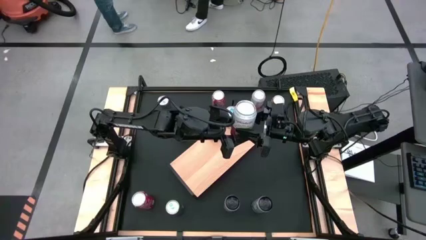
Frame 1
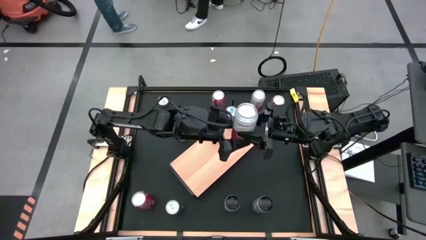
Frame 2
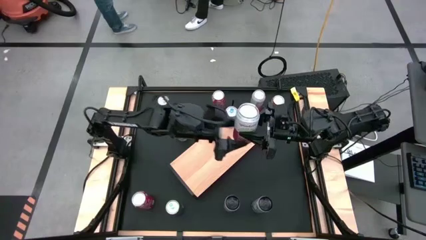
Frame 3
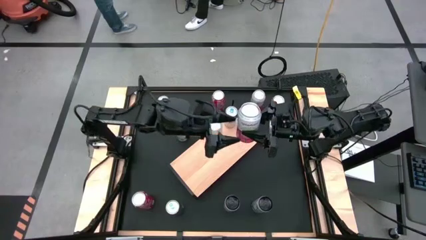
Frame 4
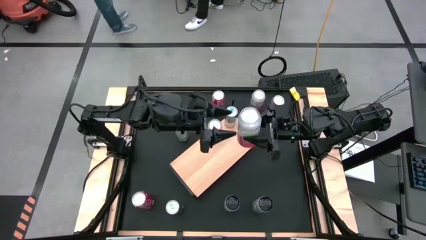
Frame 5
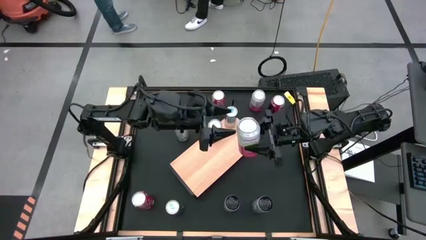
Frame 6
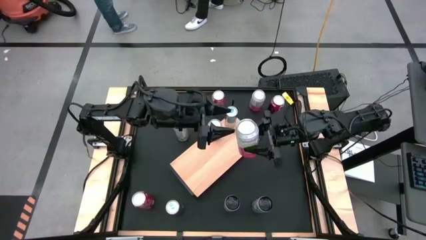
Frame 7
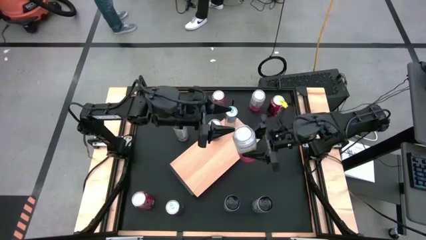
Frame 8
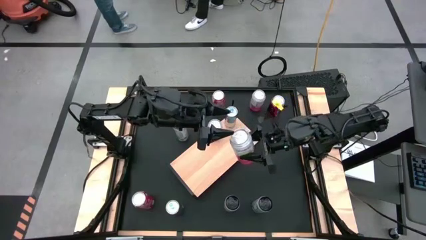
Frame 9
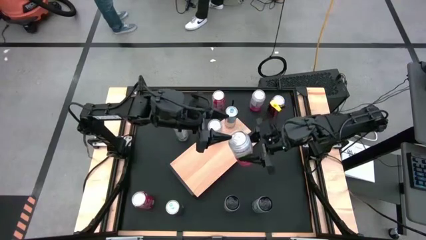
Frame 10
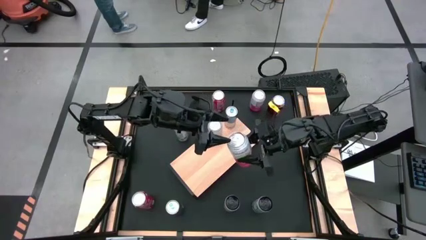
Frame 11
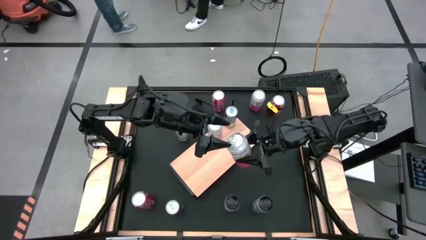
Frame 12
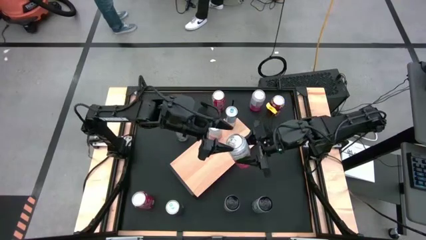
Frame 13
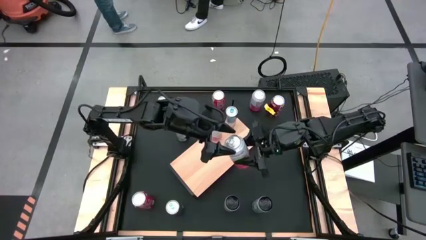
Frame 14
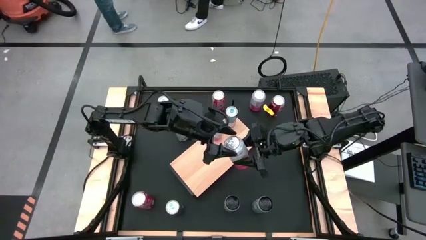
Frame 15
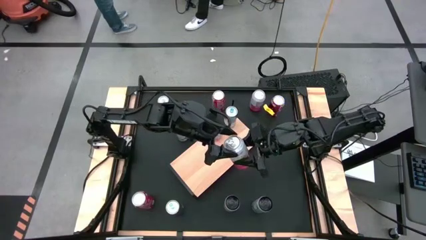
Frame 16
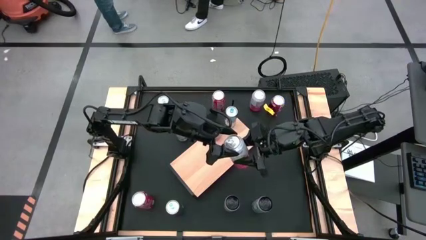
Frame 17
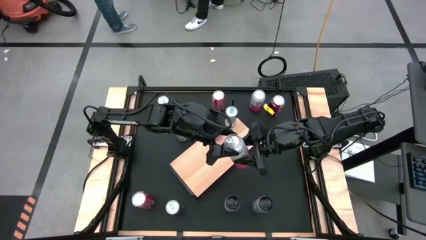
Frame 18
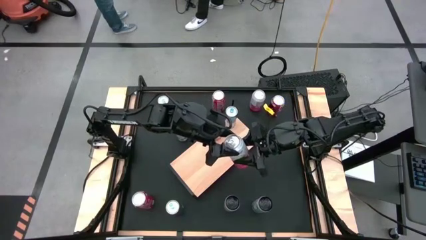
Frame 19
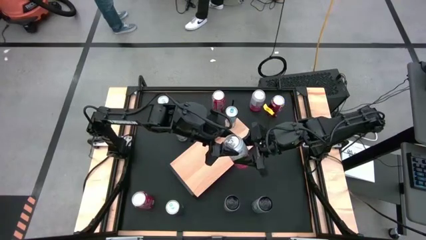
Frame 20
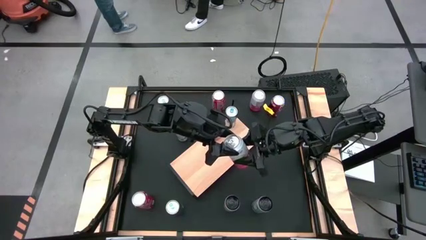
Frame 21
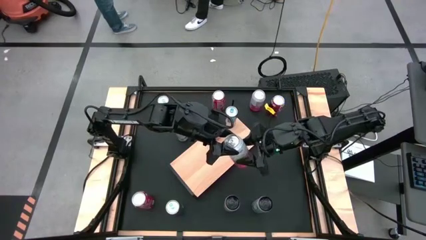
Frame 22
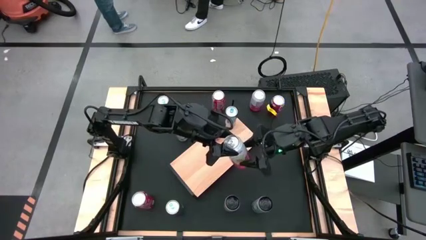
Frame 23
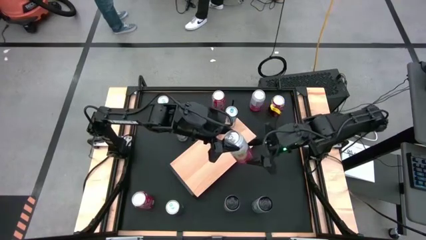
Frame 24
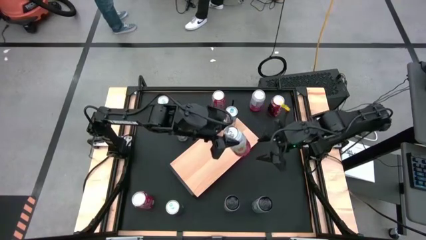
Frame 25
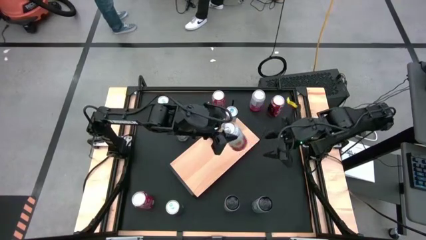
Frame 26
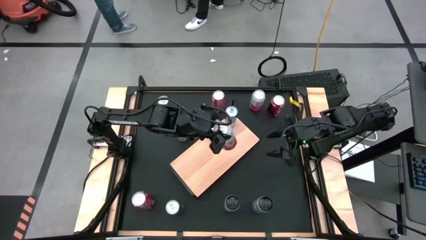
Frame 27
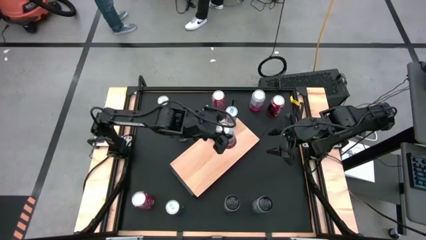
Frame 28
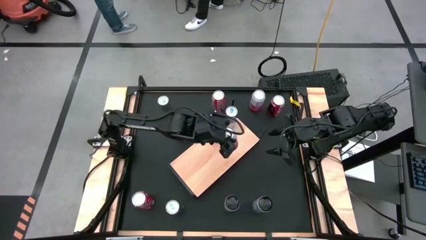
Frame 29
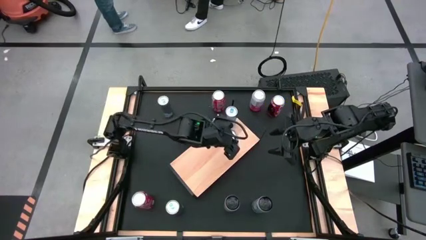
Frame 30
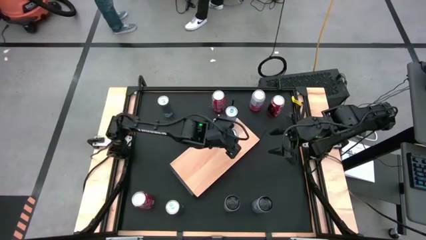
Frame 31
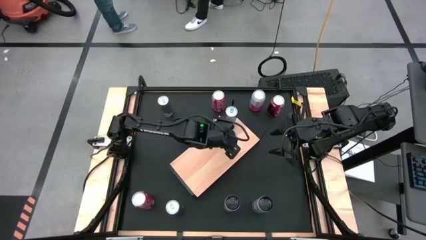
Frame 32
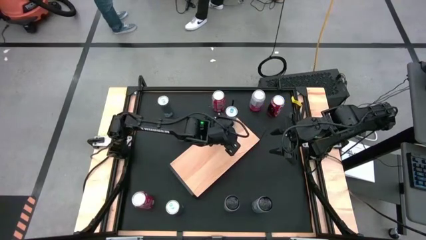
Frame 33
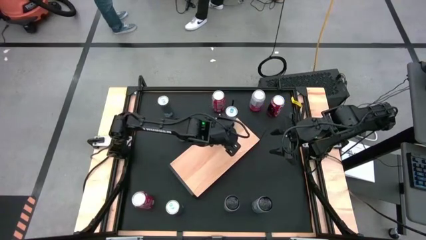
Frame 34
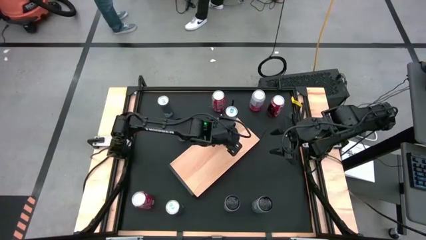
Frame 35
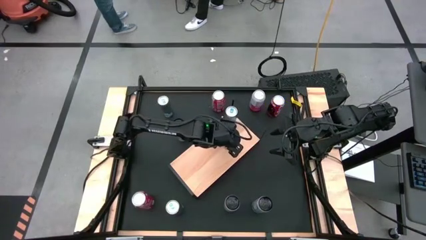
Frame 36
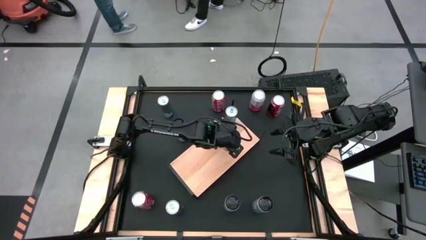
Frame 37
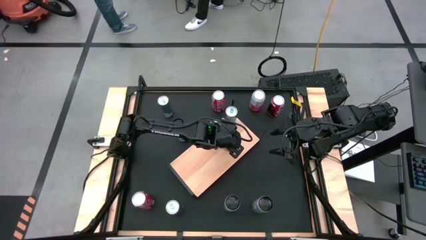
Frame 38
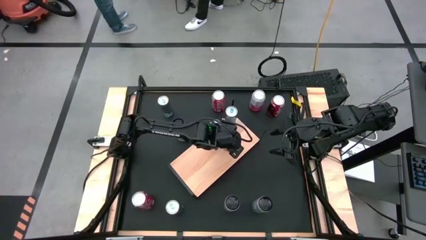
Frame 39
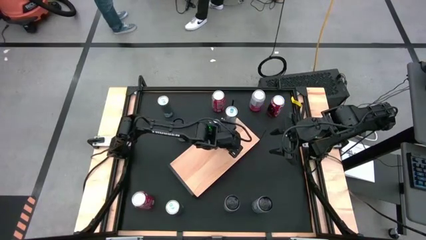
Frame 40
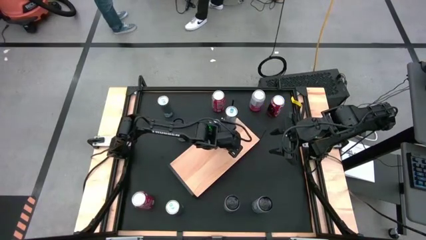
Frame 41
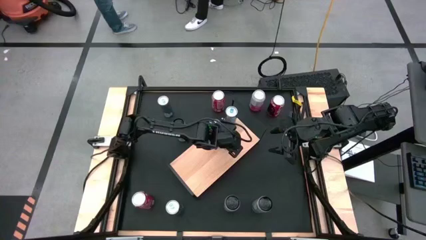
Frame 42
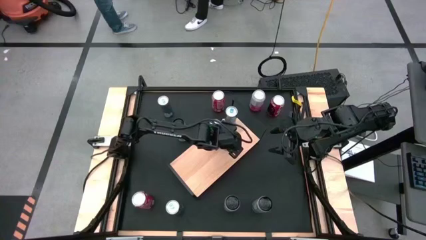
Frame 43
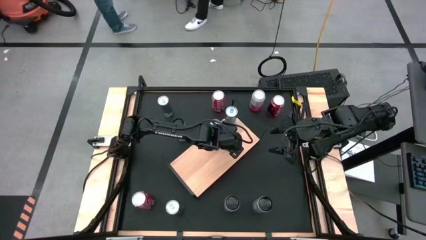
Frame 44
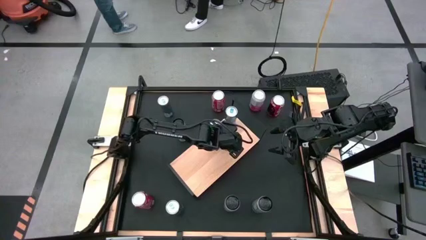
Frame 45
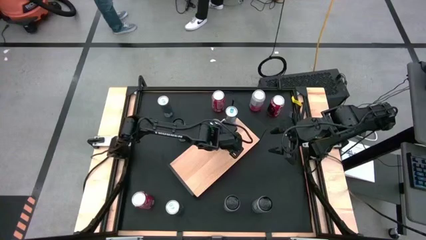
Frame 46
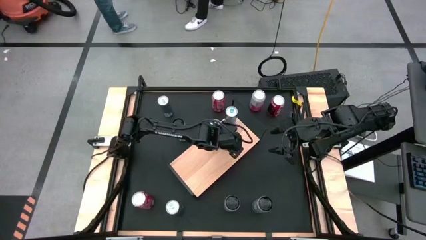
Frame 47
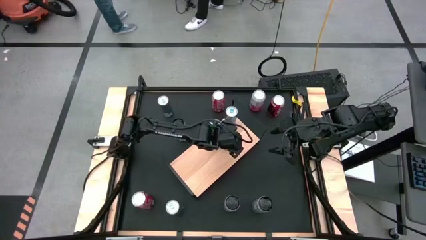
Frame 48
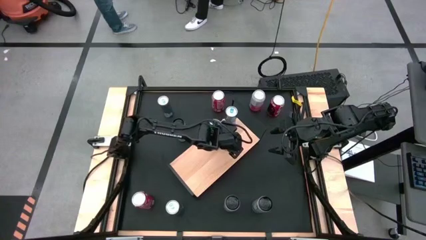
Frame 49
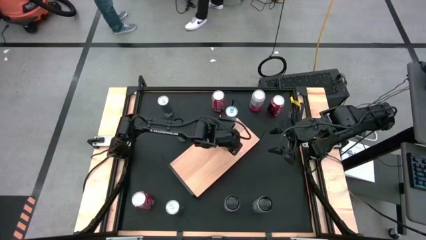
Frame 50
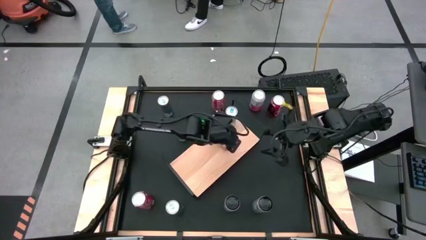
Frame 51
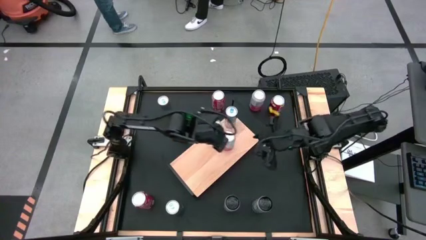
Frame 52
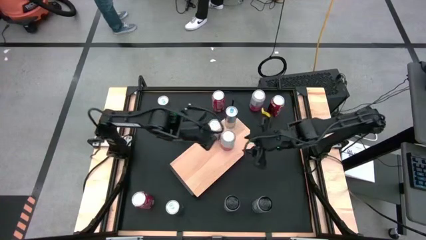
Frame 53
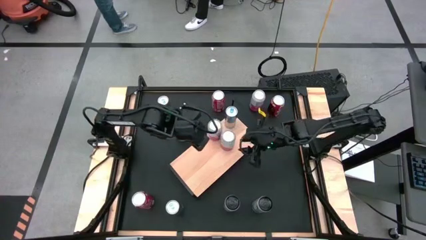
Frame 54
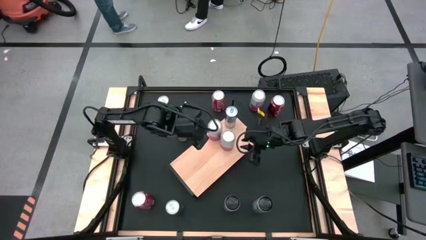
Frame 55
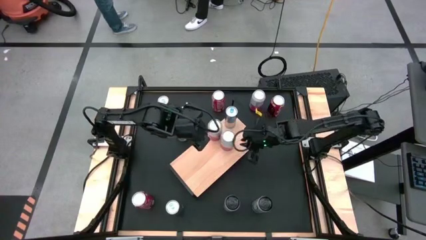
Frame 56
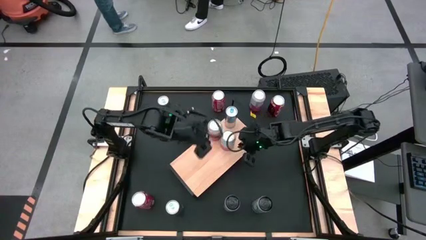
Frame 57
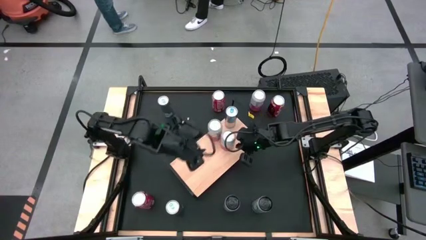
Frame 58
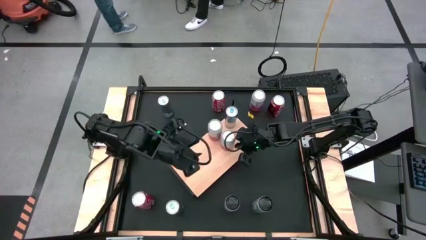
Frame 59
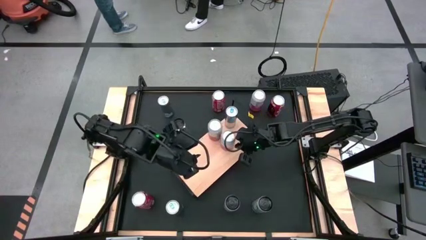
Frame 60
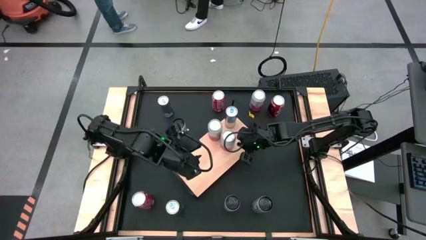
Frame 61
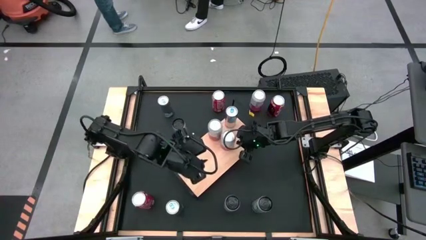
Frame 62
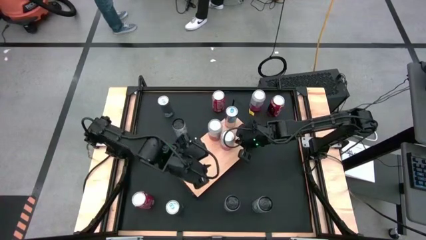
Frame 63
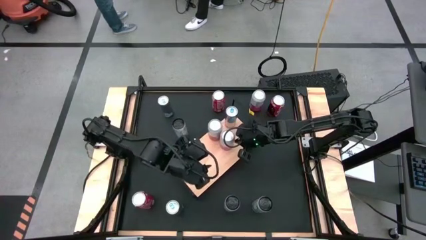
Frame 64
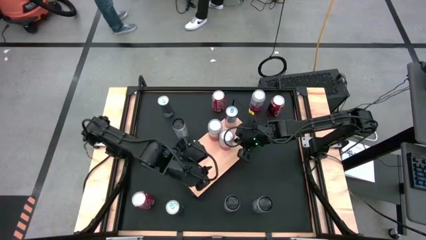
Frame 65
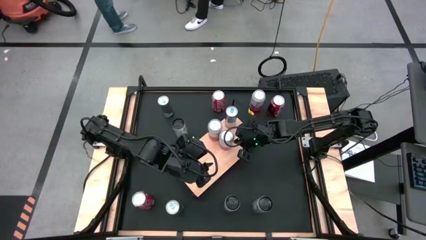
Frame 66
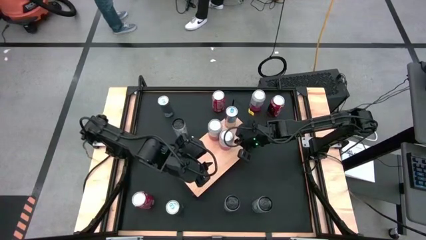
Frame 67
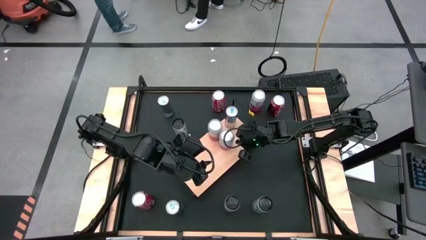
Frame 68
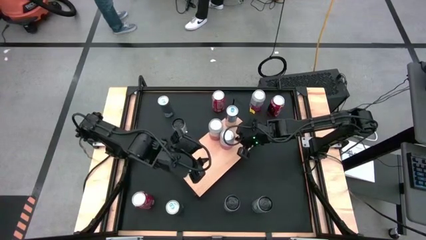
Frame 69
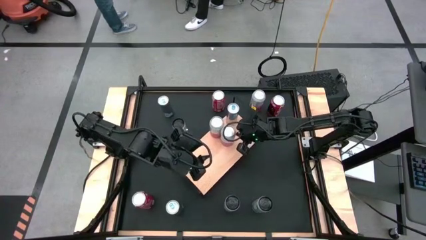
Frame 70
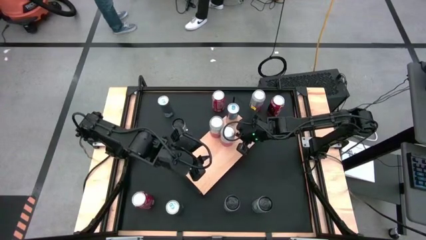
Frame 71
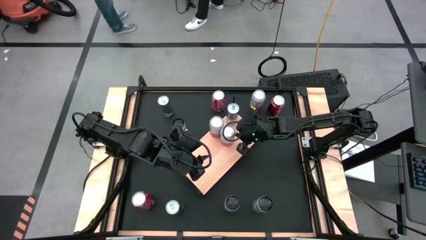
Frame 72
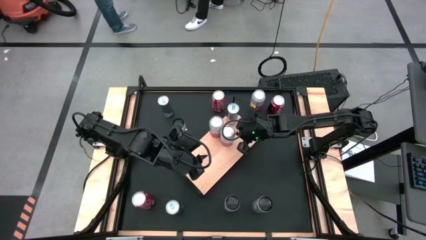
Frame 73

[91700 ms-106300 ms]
Task: Place canned beverage on shelf
Put the bottom pink soda can on the shelf aligned with the other pink soda can
